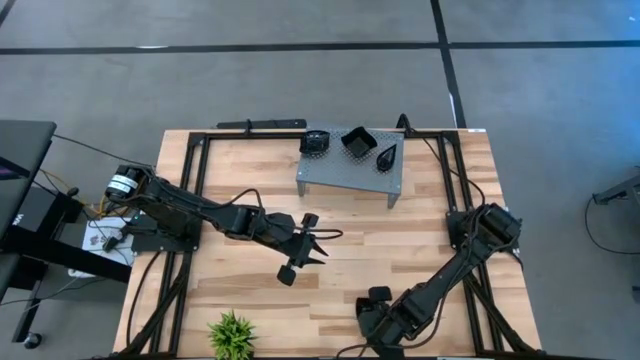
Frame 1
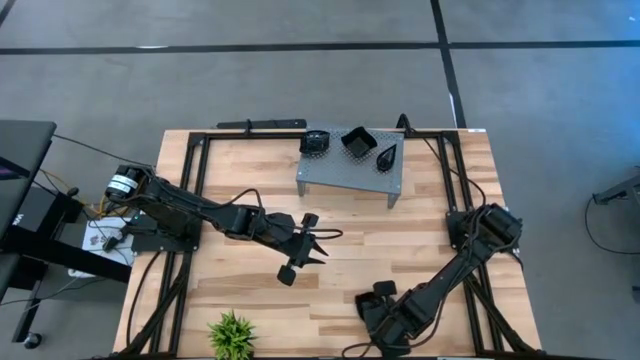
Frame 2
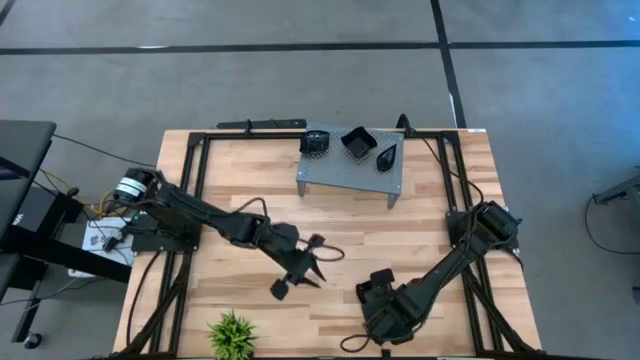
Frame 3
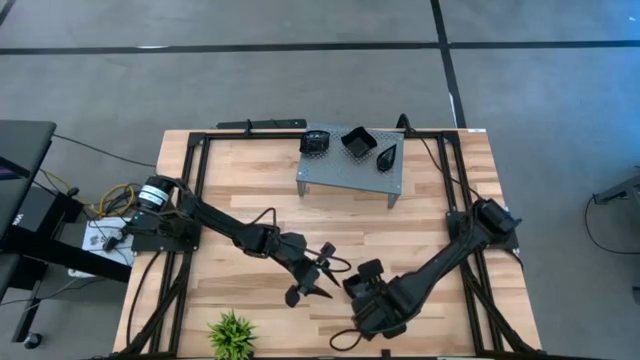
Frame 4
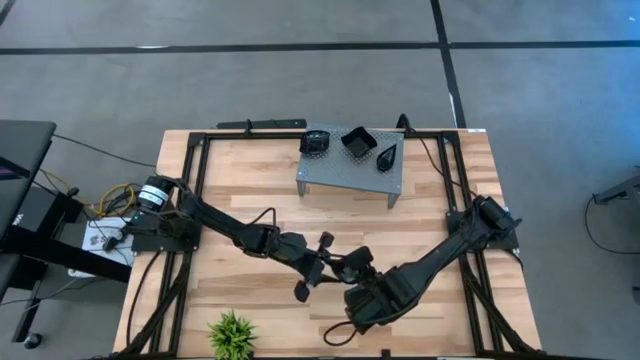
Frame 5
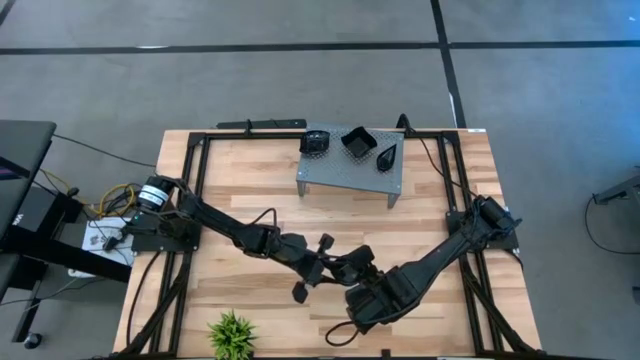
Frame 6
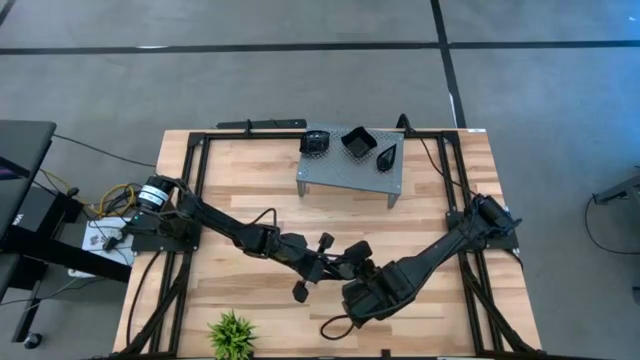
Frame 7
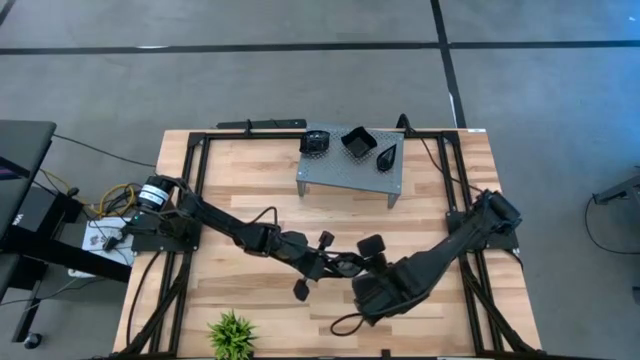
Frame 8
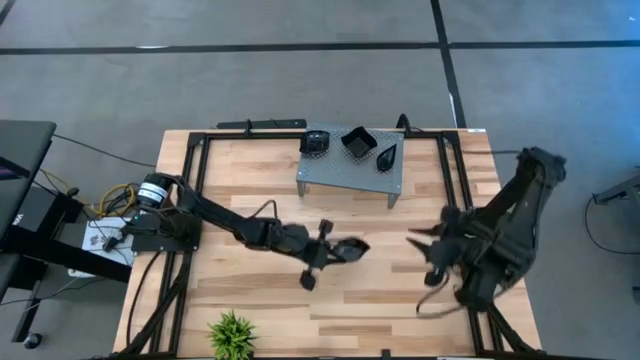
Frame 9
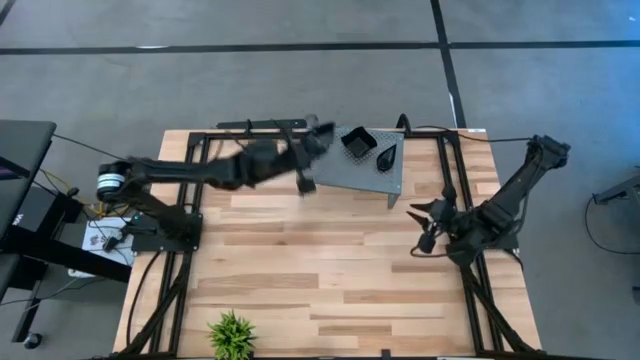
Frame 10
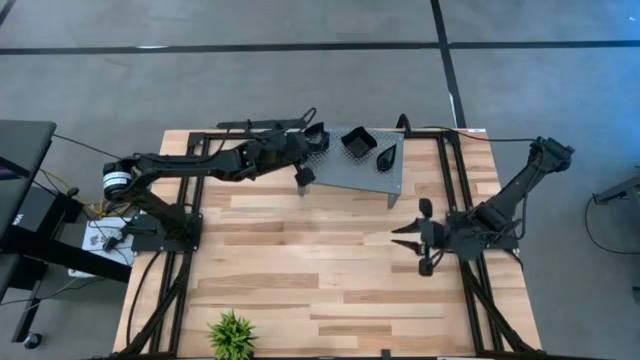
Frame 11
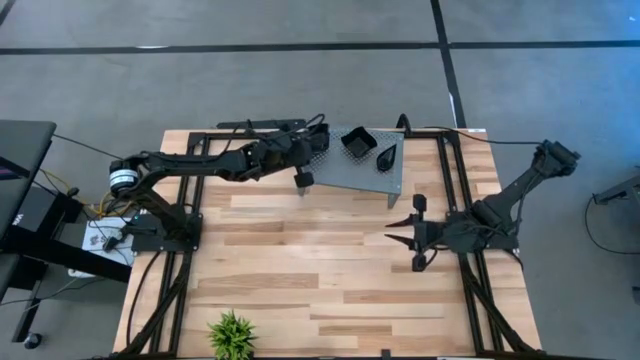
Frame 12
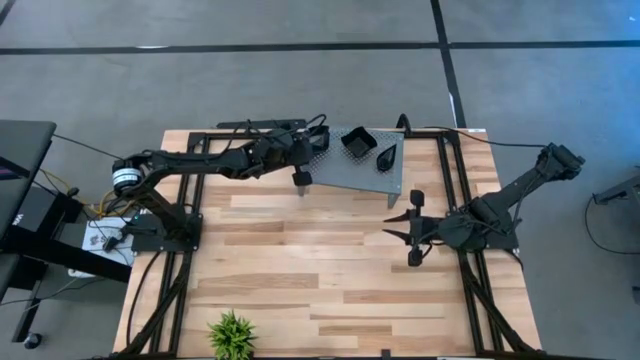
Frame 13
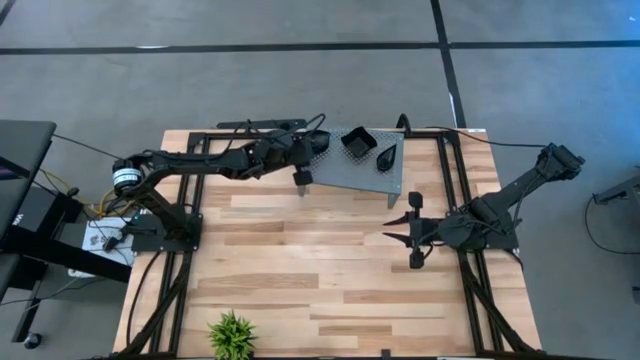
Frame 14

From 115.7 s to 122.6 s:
Task: Pick & Place Mini shaped plates
Stack the black leaf-shaped plate on the other black leaf-shaped plates on the shelf

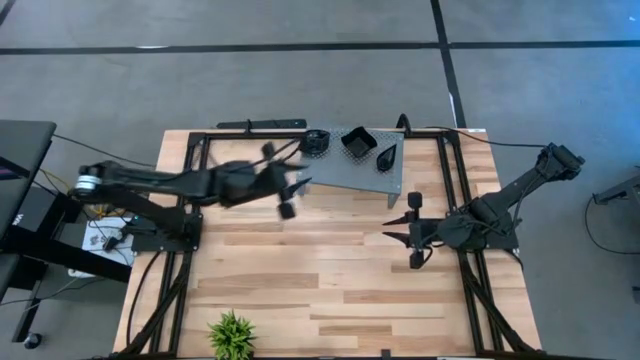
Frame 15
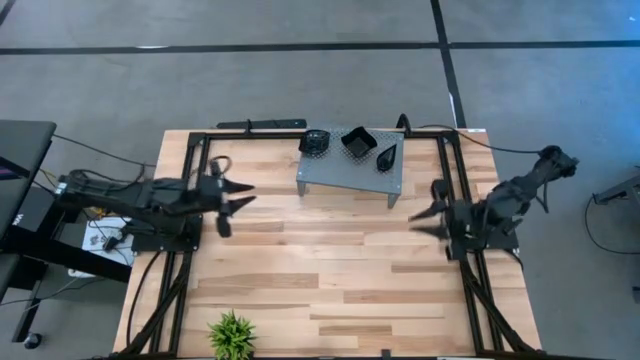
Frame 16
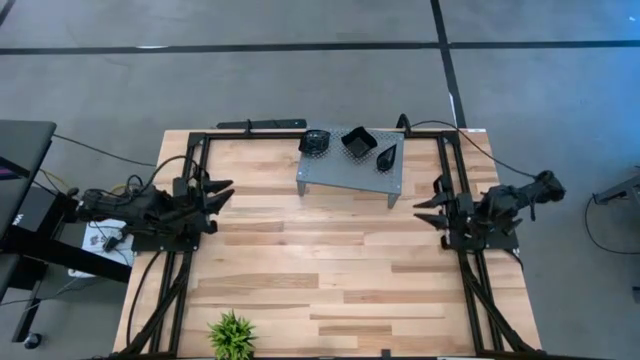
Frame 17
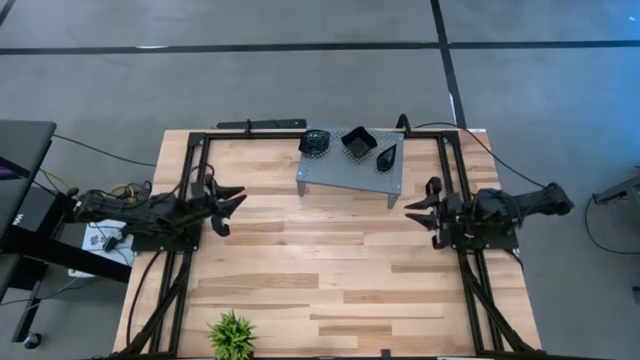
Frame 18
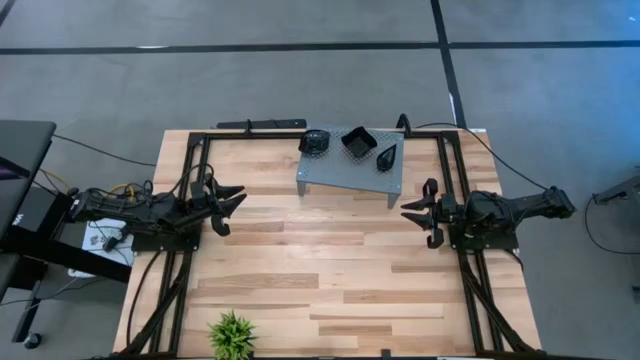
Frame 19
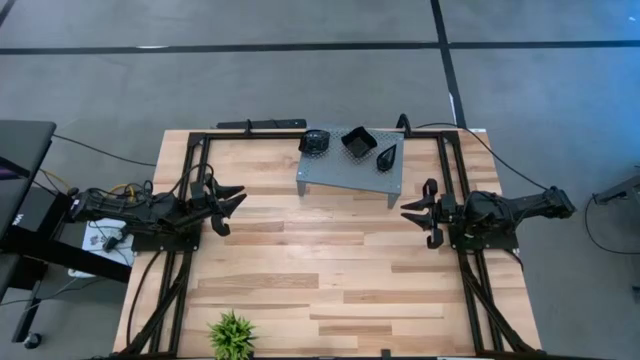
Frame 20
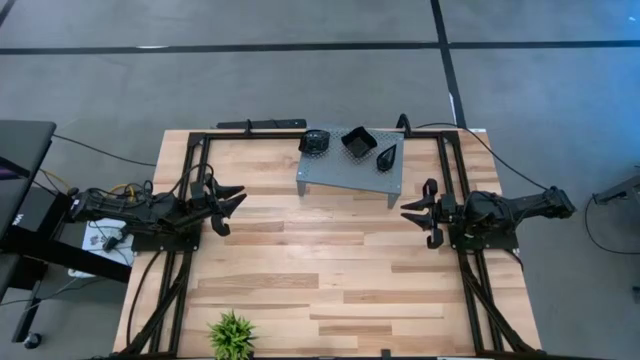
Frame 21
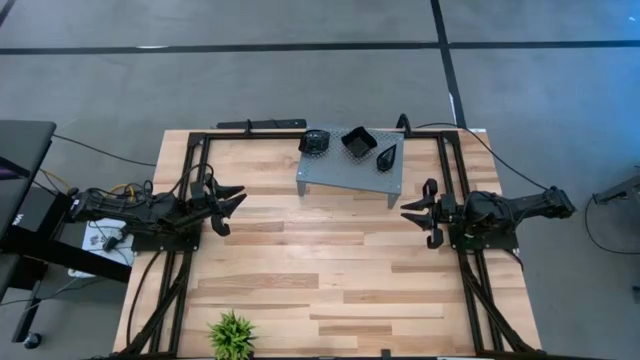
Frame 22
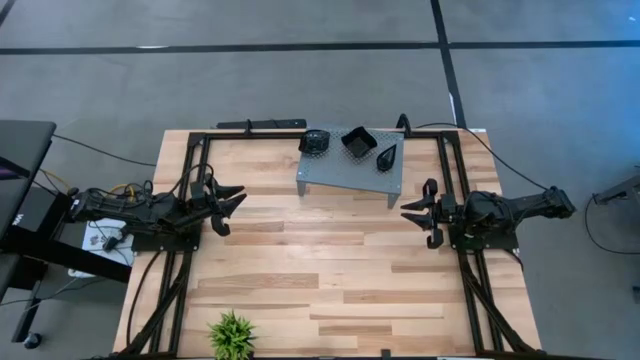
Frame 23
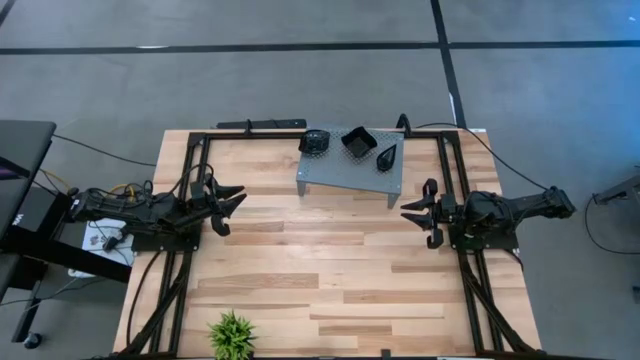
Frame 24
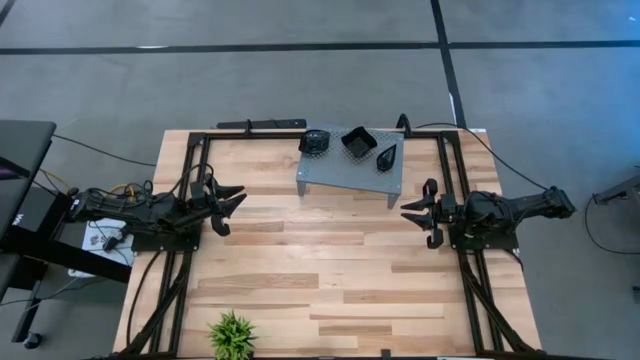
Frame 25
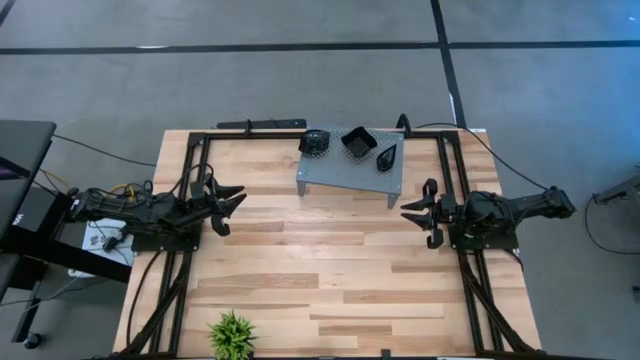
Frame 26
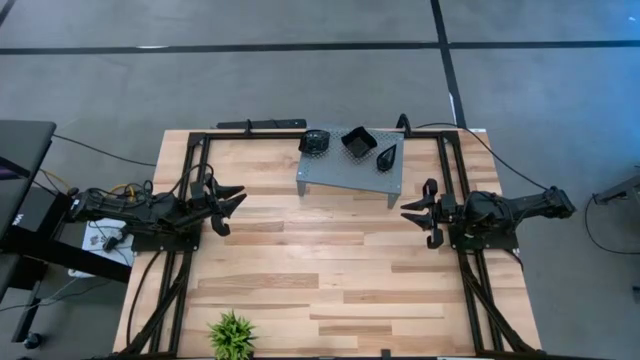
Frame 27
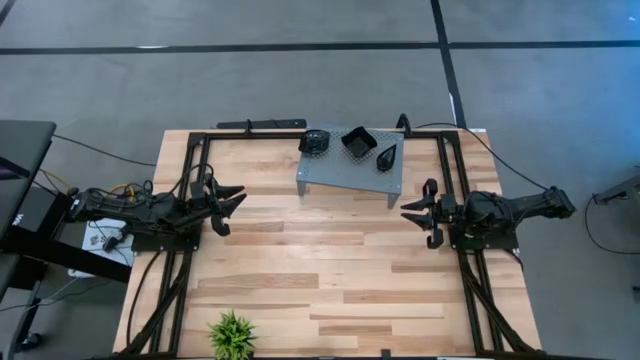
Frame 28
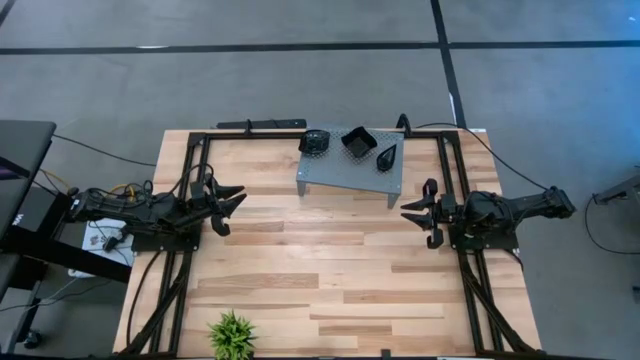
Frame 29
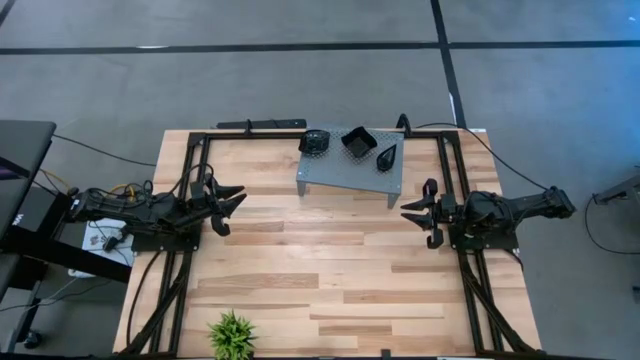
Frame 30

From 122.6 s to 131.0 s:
Return to Home Position

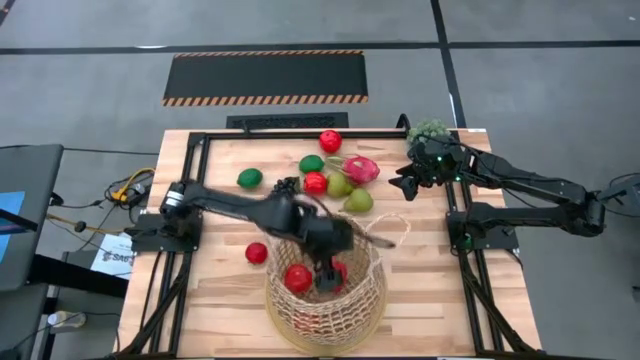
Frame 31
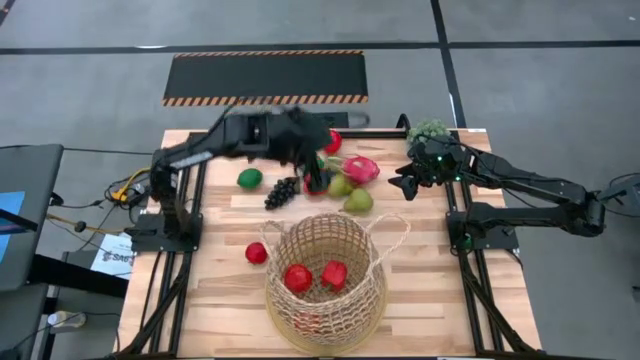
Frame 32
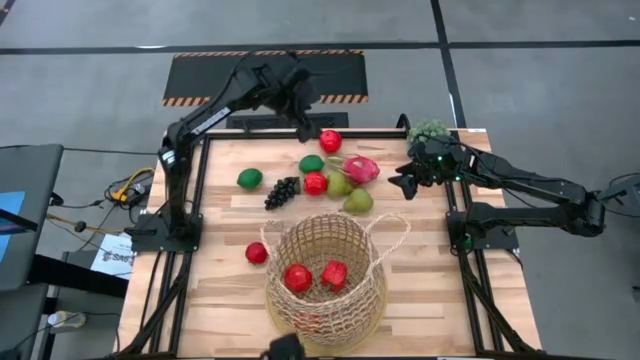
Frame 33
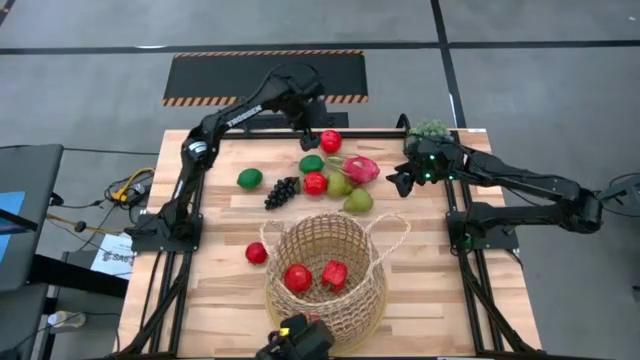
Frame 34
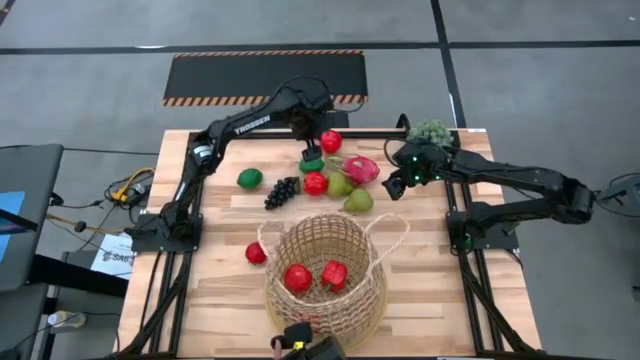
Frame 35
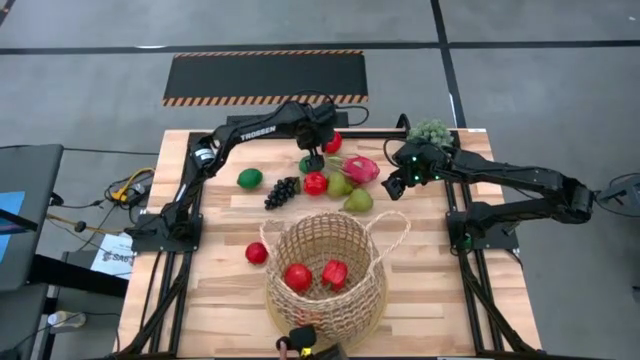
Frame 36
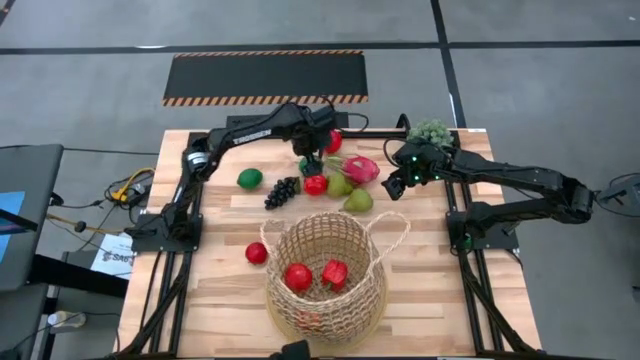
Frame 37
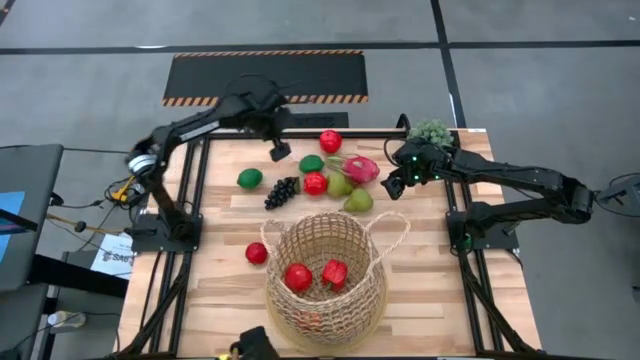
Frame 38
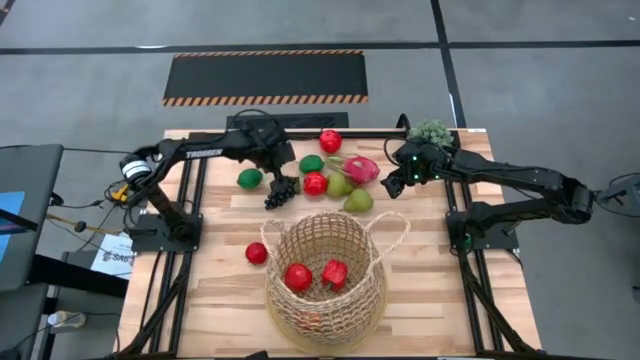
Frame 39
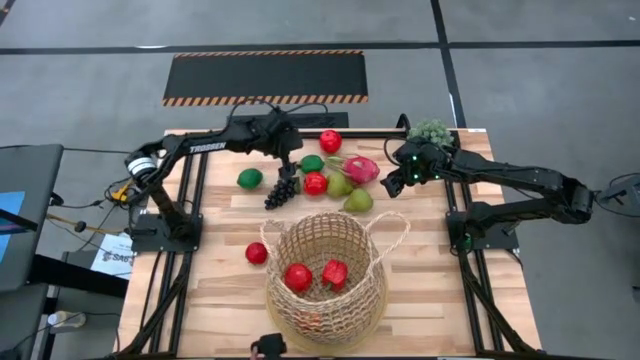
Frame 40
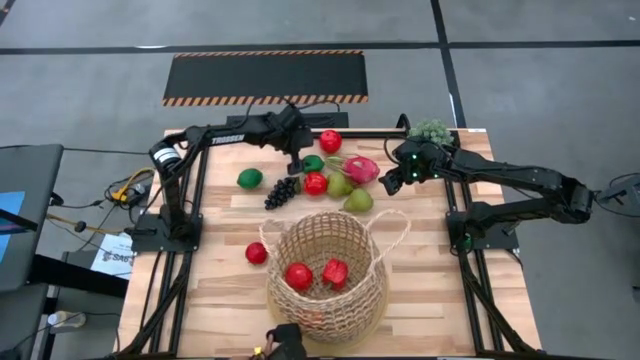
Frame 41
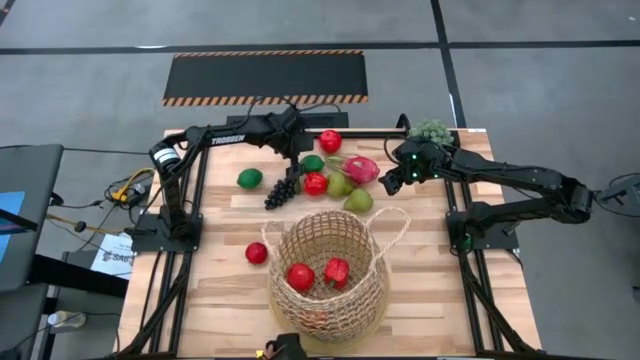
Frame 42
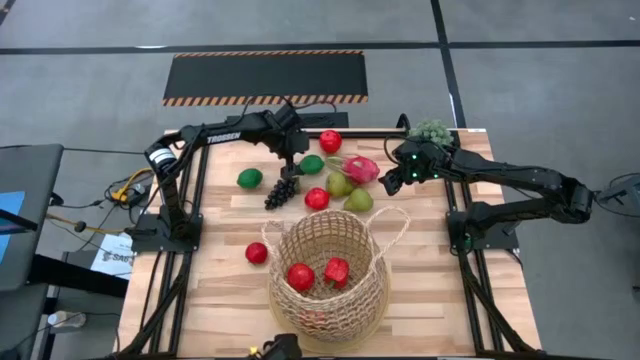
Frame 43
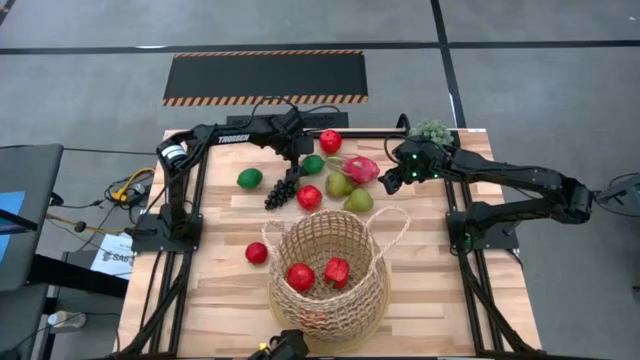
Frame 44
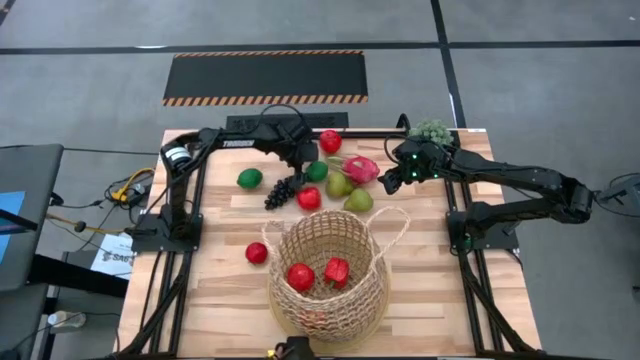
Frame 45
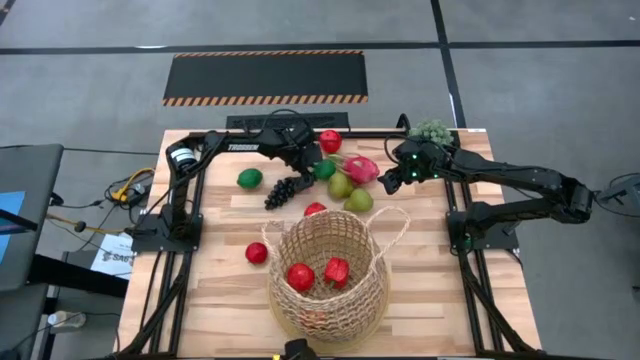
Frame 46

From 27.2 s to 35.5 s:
Task: Build produce basket
Put the lime into the basket
